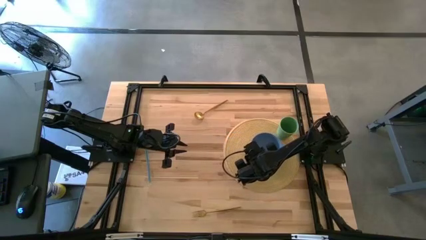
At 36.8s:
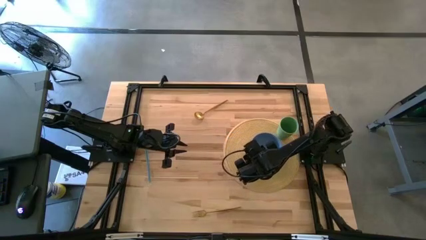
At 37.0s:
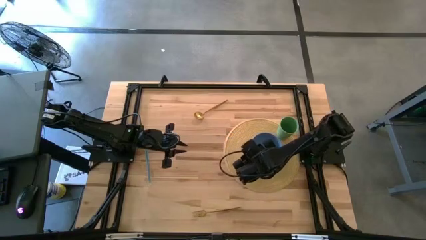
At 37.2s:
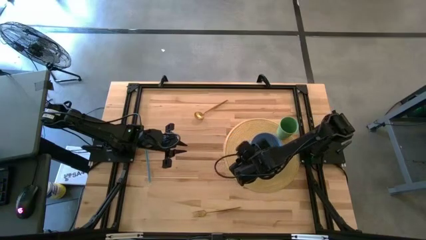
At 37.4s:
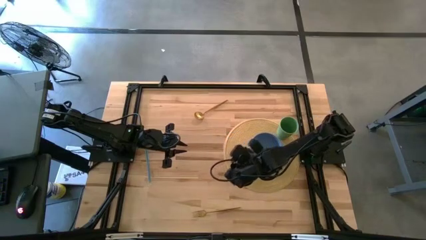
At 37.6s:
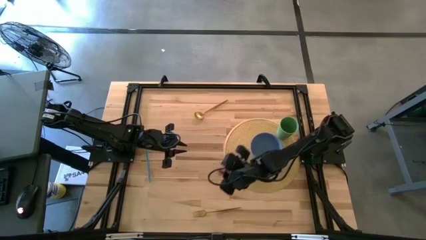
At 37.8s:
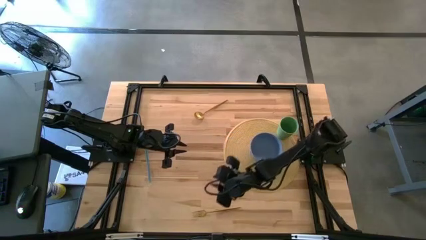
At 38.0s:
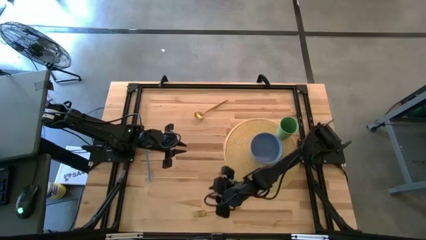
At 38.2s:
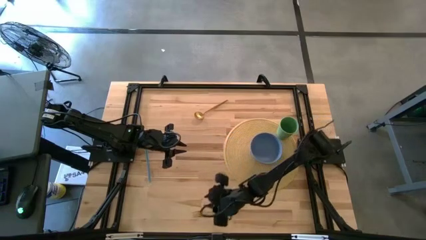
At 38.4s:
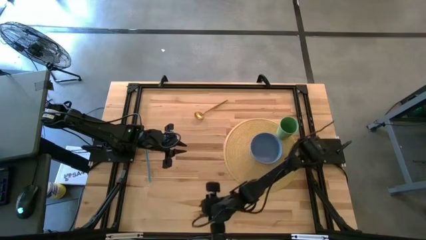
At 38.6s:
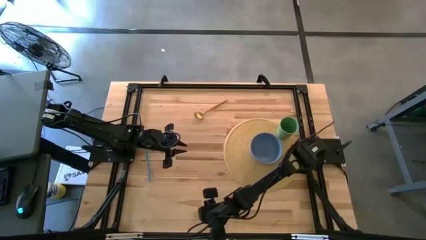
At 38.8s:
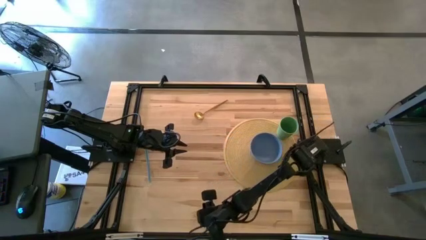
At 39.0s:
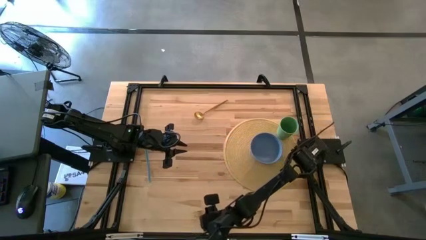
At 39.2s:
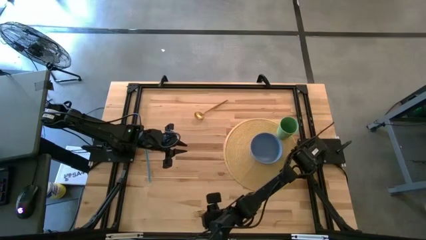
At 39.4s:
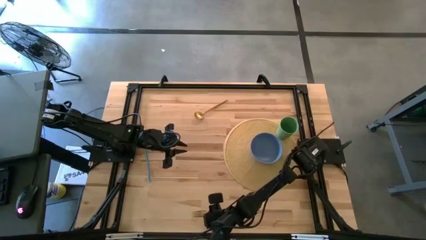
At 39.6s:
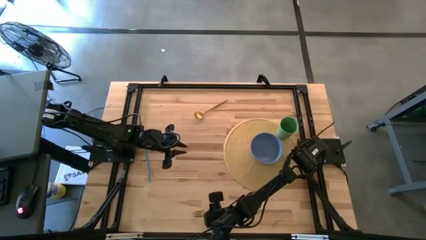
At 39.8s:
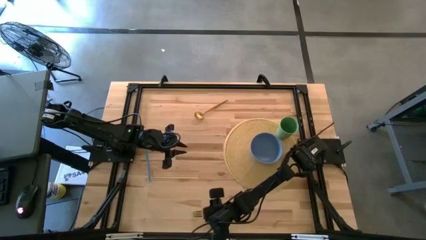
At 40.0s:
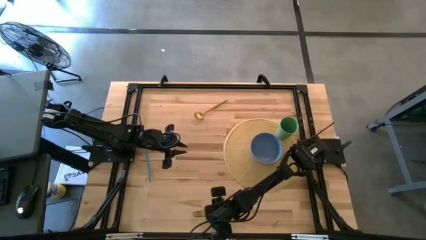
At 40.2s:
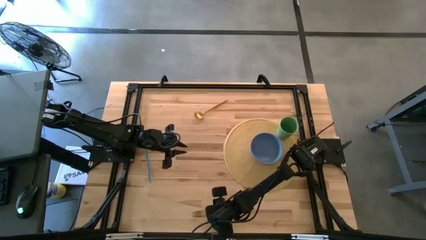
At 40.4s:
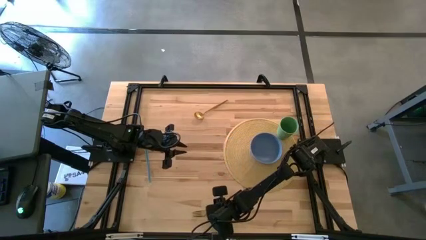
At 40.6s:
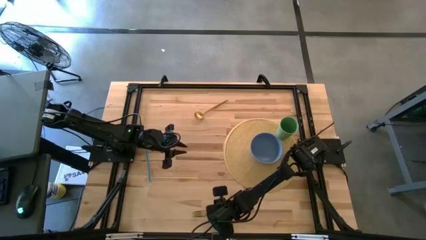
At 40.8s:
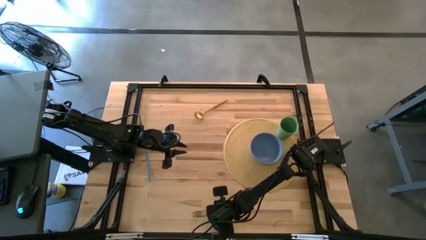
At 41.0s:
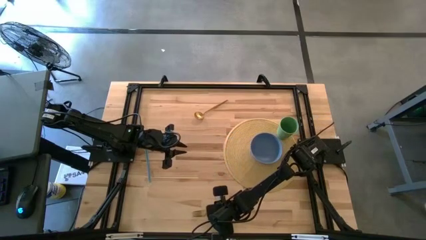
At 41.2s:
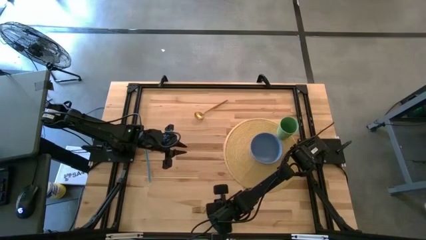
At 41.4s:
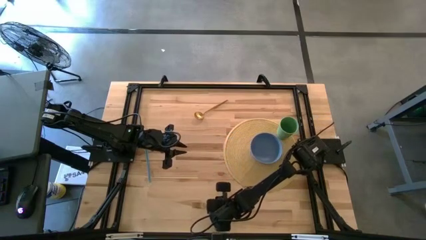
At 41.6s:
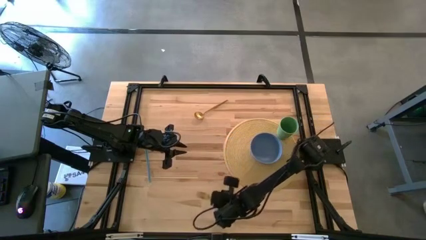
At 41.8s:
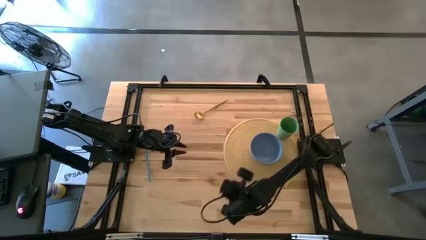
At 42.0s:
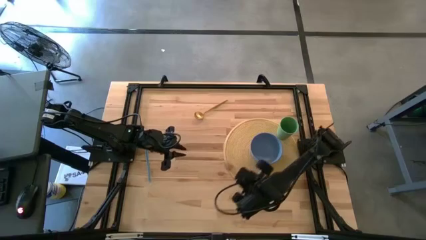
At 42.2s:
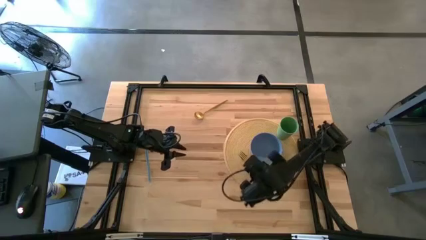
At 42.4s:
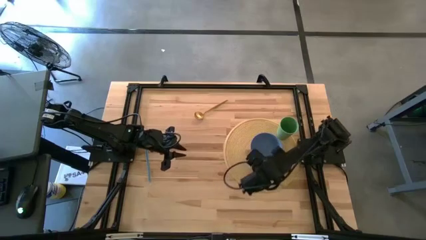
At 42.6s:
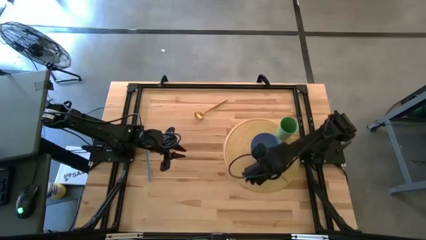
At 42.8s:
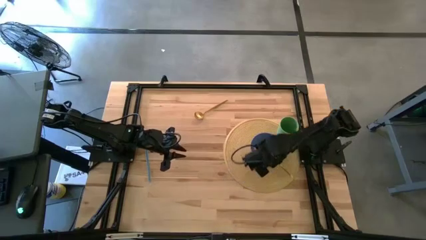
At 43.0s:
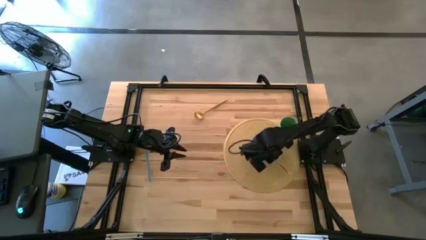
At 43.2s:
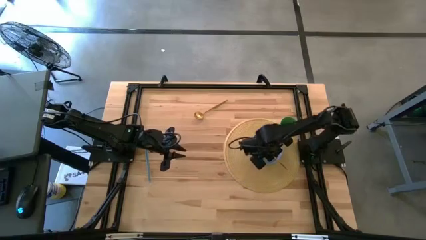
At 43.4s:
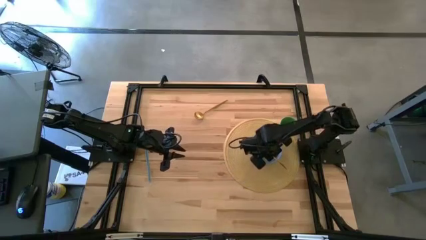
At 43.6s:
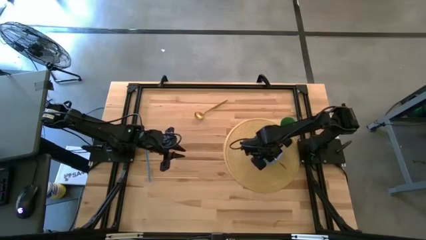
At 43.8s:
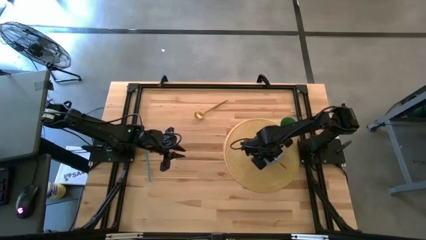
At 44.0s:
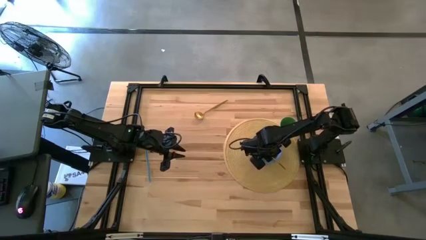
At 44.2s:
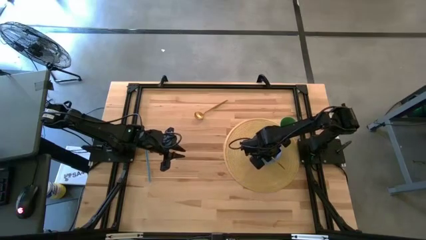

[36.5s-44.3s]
Task: Pick & Place Utensil
Put the gold fork into the blue bowl on the brown placemat
